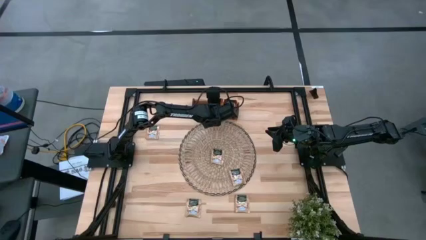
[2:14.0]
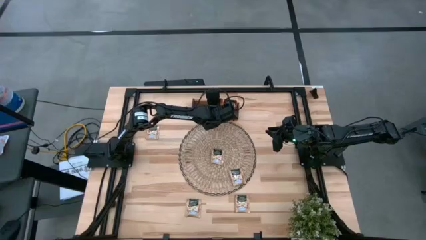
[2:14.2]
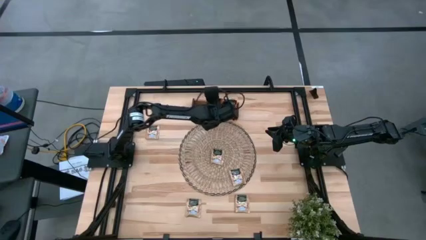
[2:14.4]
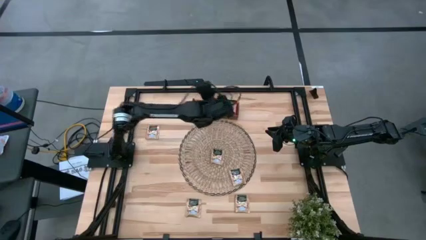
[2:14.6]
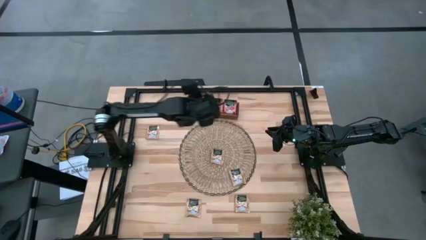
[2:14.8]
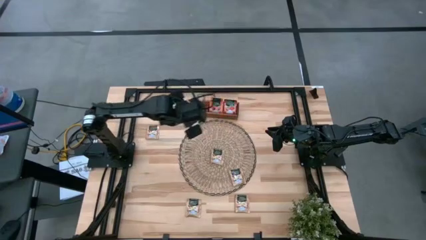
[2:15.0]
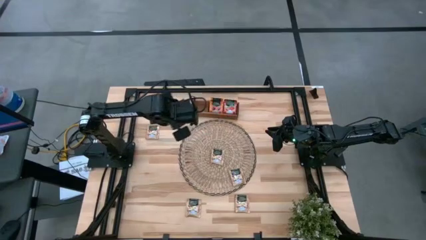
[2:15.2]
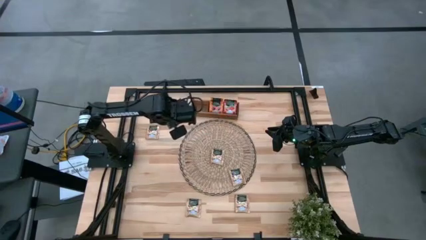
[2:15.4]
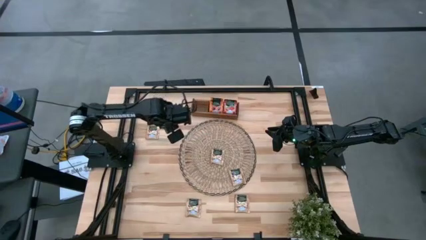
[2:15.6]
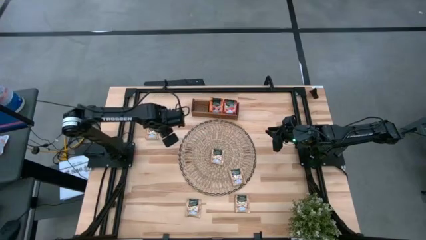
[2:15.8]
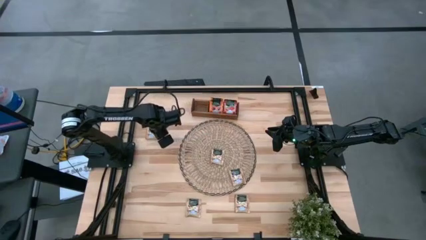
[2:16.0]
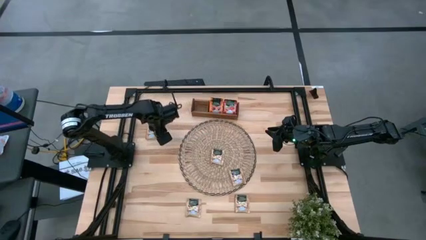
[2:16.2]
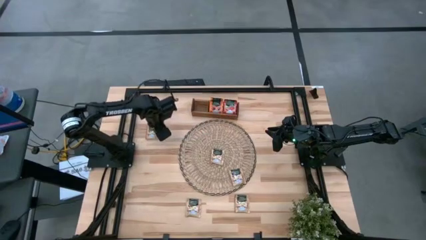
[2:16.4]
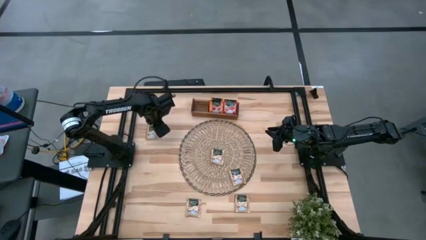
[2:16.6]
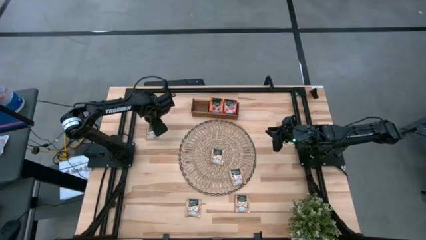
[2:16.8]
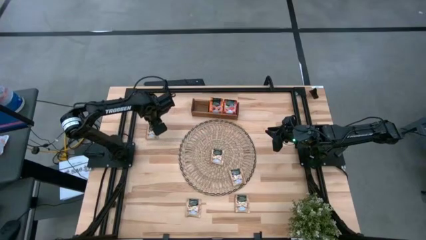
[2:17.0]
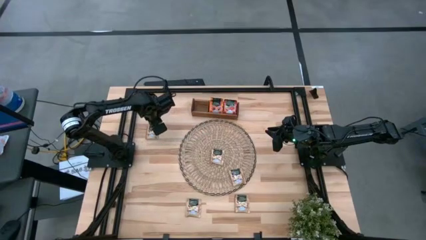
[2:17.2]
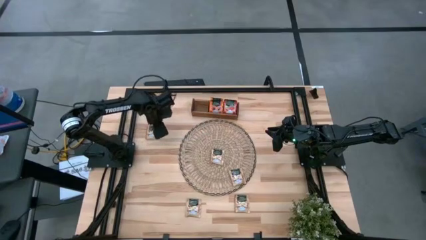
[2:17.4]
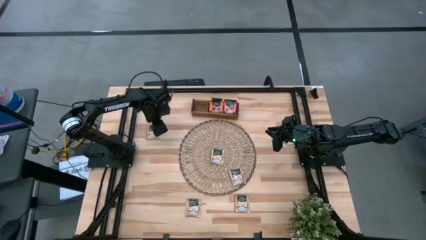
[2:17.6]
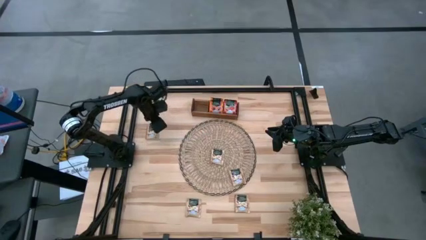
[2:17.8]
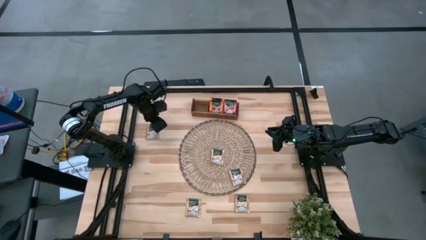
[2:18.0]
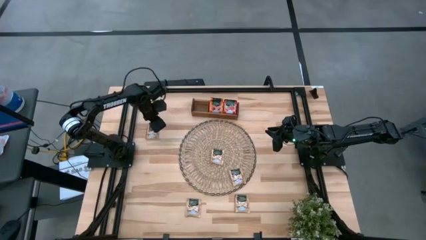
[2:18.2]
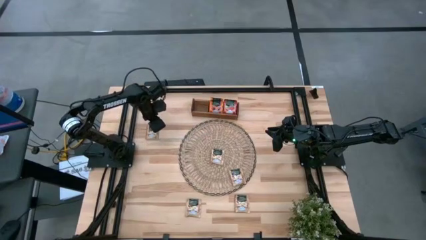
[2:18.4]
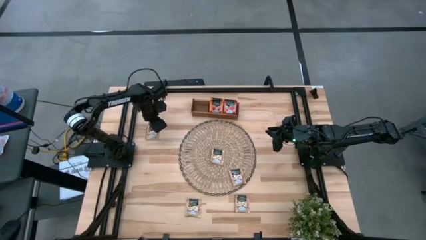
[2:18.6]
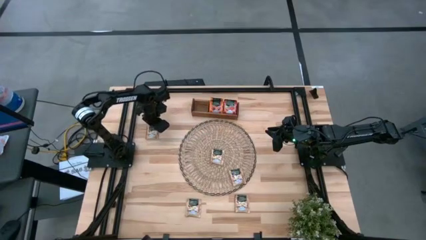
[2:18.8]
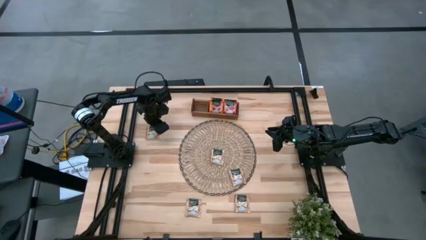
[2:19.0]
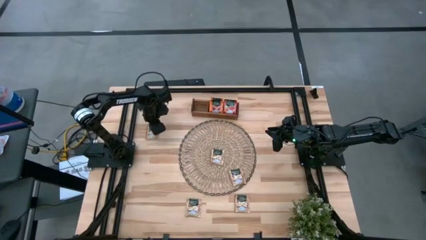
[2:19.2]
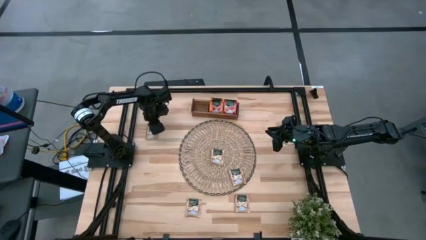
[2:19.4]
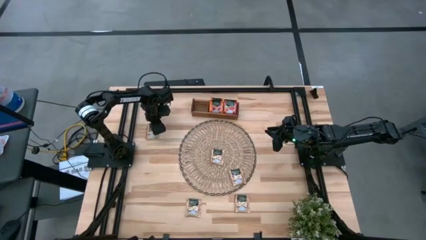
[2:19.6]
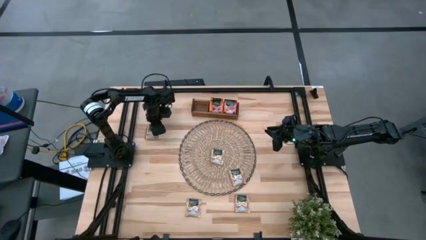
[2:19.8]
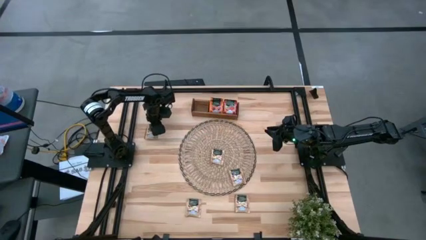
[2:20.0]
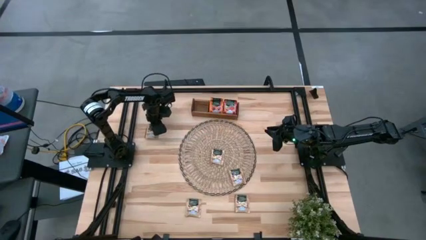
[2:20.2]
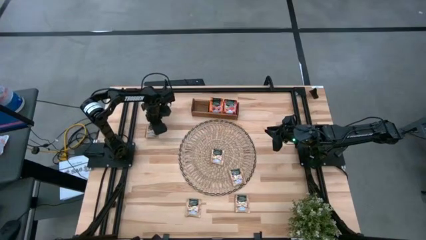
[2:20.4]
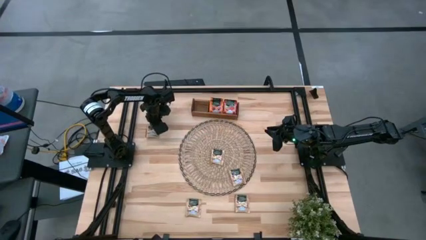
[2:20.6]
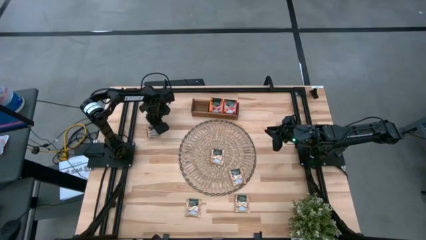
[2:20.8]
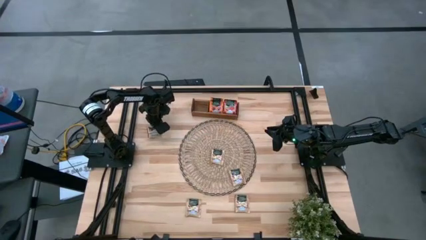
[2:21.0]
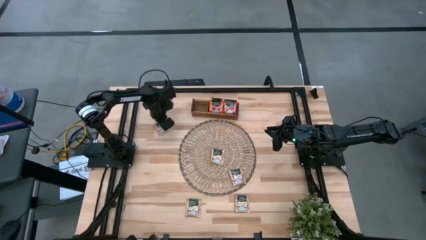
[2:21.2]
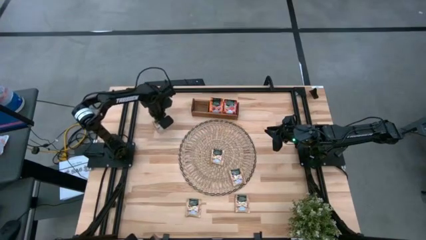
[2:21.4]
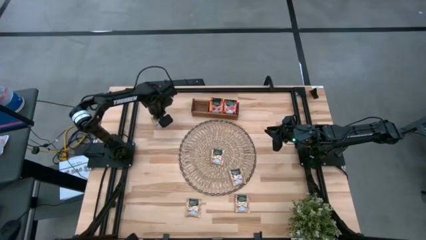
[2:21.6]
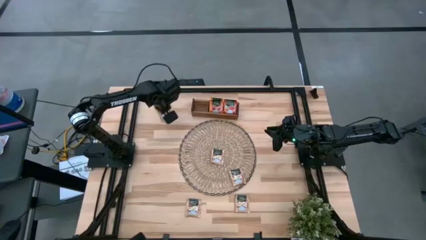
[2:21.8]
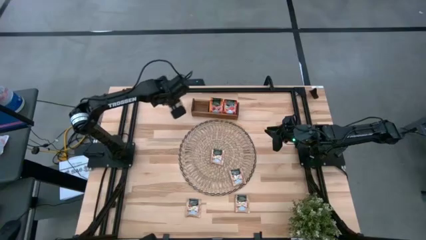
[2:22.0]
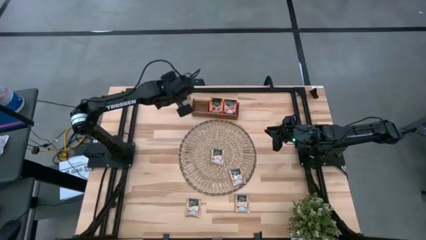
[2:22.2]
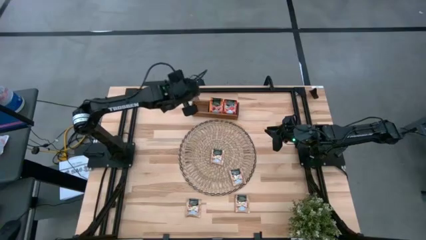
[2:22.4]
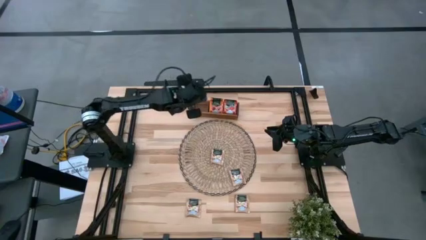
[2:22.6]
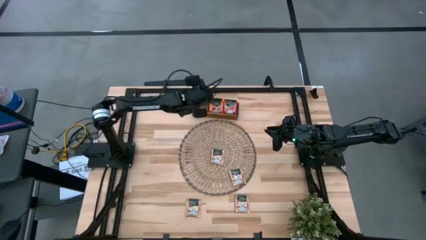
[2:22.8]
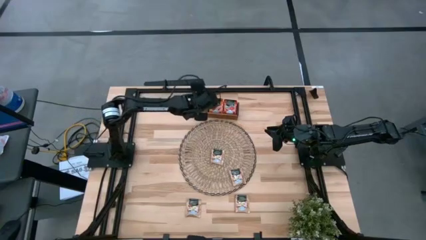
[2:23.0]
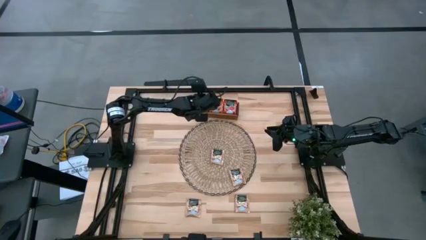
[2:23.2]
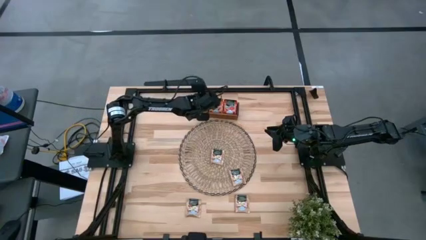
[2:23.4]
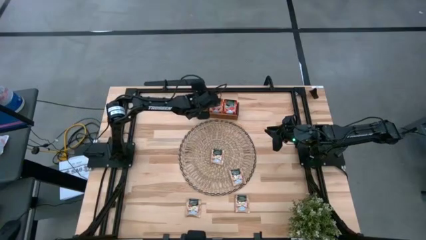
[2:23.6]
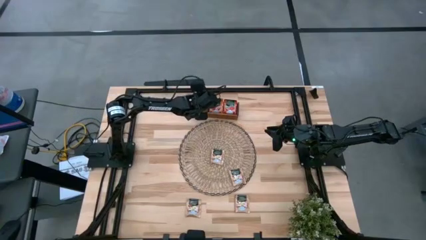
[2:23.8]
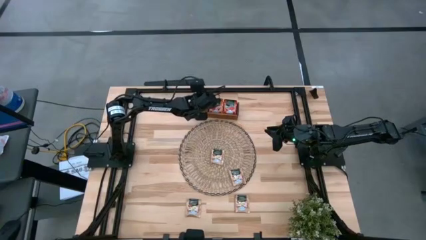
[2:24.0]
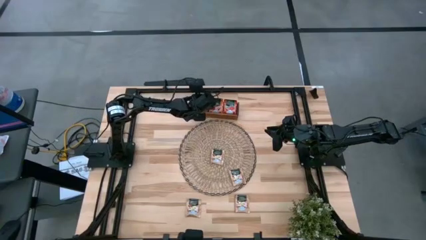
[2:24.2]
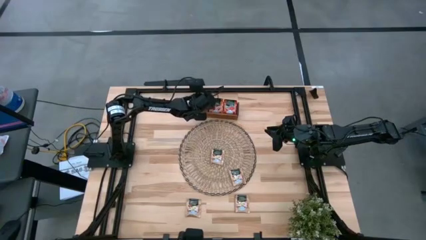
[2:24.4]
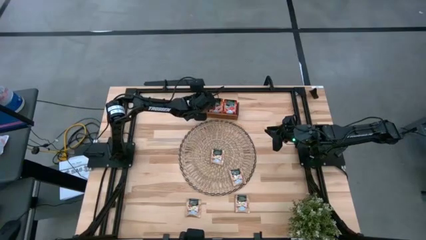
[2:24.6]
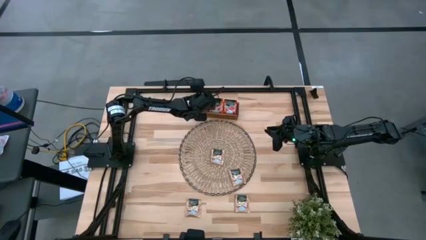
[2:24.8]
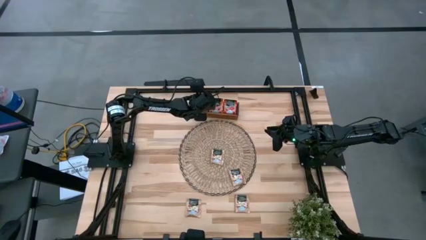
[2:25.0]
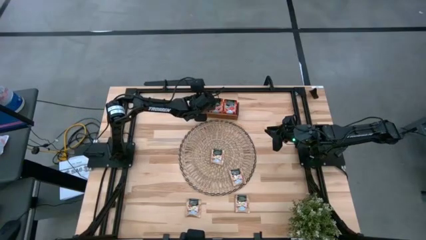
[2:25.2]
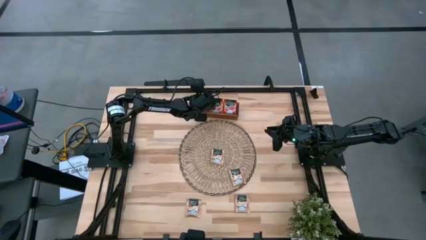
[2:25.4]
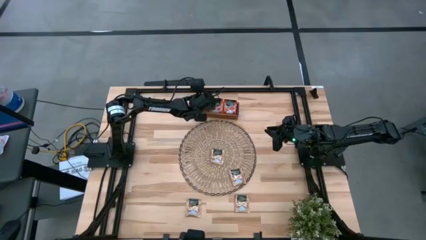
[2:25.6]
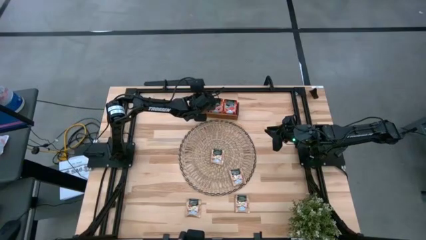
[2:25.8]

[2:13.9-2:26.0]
Task: Pick & Place Tea
Put the brown tea bag into the left section of the wooden organizer

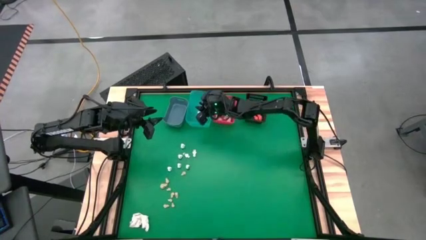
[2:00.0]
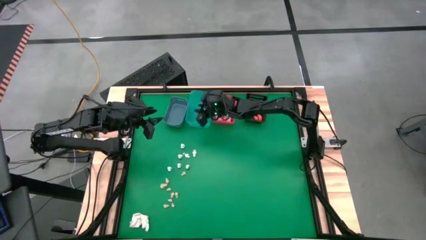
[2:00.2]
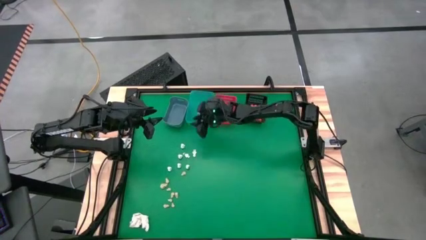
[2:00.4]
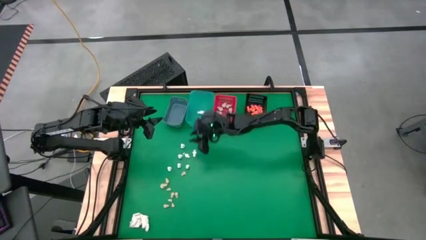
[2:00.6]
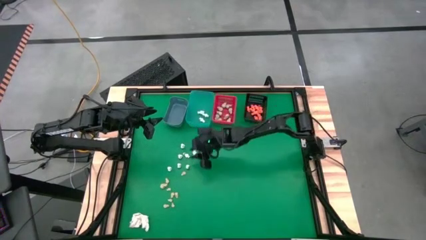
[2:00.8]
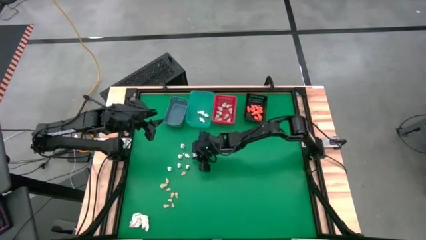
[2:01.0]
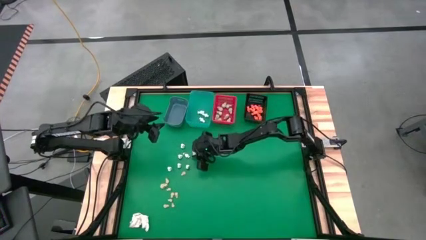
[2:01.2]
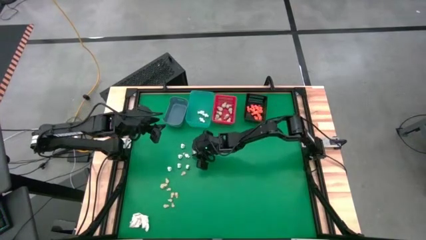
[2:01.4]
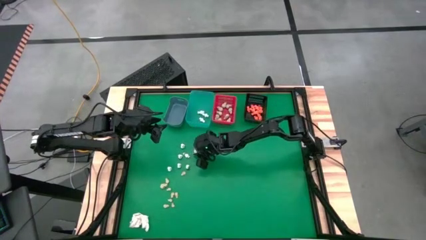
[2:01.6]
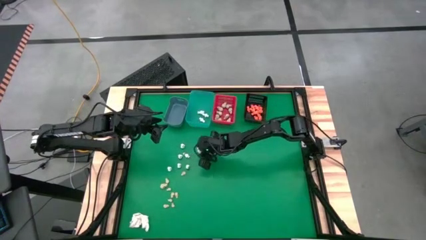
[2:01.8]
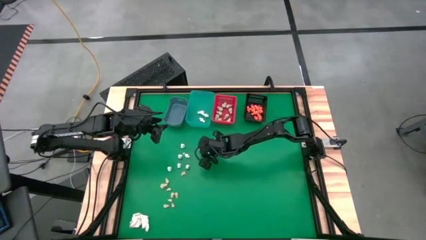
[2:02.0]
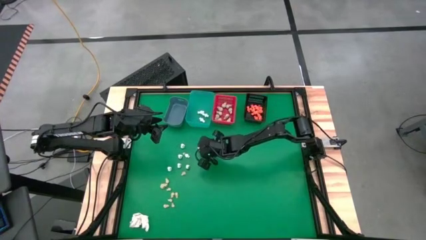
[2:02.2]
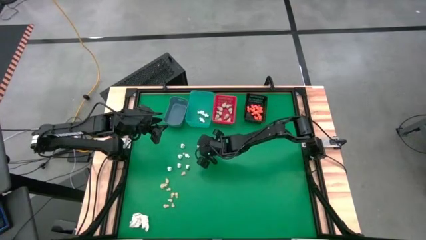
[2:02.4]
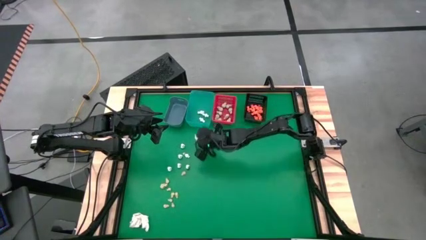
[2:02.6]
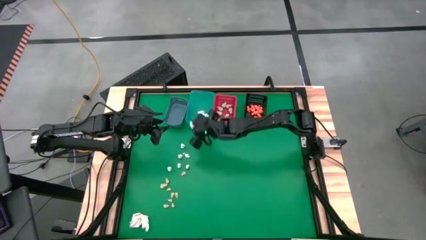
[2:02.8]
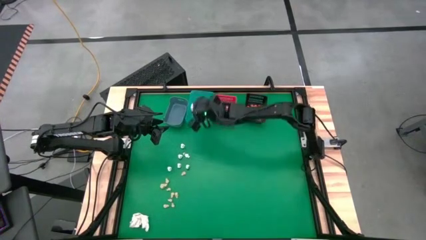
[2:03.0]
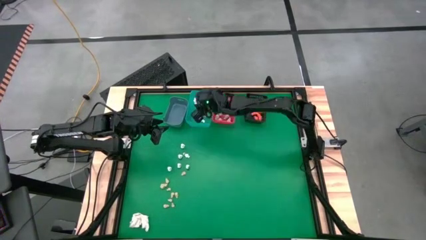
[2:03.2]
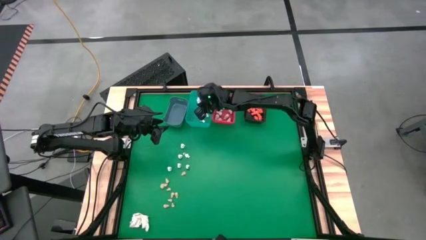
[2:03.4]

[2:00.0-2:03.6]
Task: Sort Halloween decoration
Put the white skeleton toy into the light blue bin
